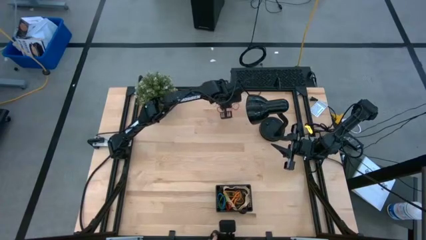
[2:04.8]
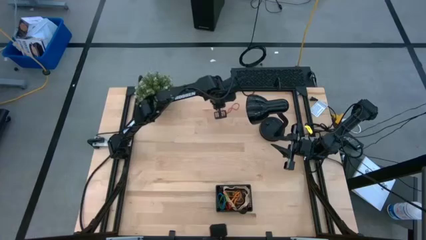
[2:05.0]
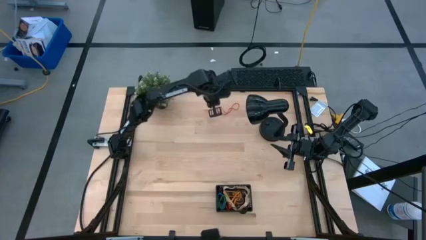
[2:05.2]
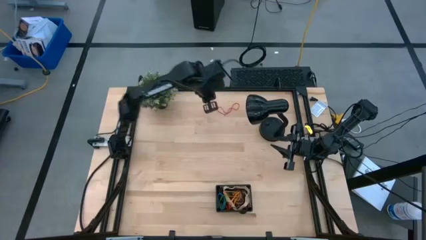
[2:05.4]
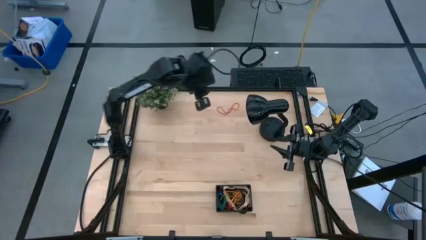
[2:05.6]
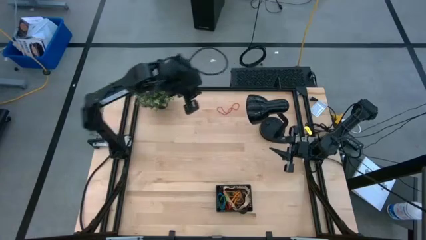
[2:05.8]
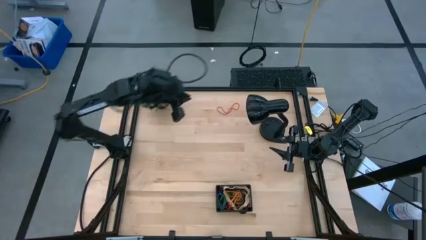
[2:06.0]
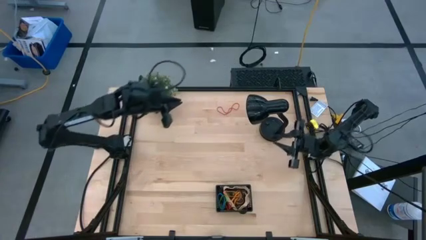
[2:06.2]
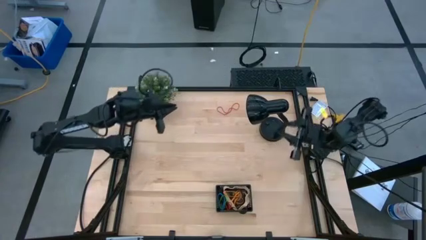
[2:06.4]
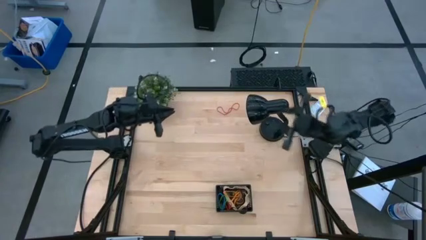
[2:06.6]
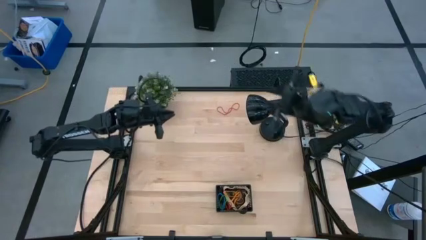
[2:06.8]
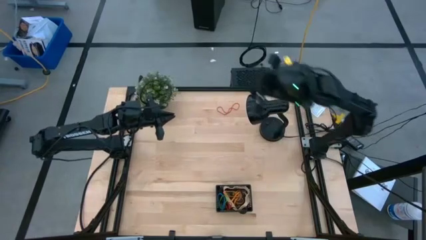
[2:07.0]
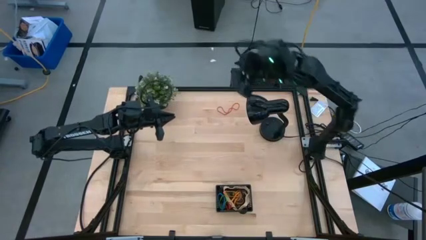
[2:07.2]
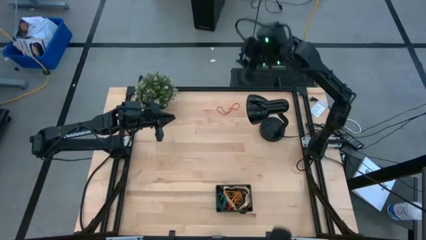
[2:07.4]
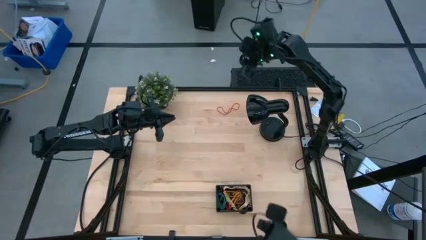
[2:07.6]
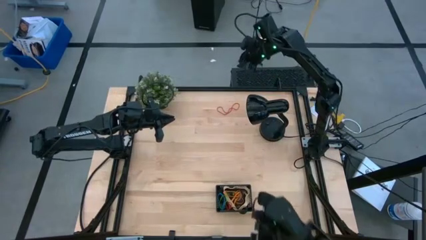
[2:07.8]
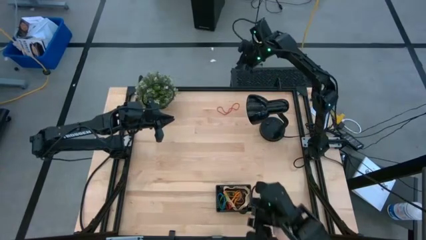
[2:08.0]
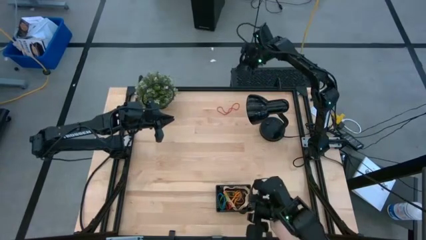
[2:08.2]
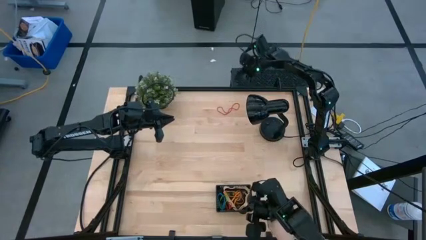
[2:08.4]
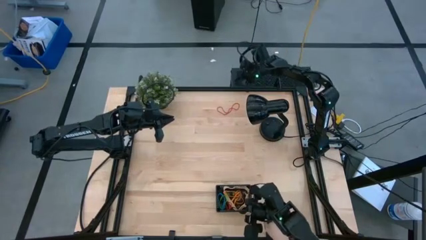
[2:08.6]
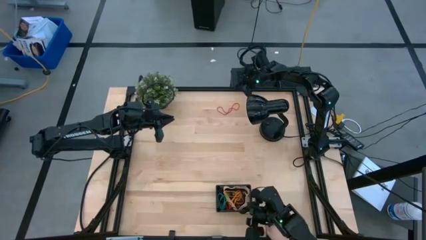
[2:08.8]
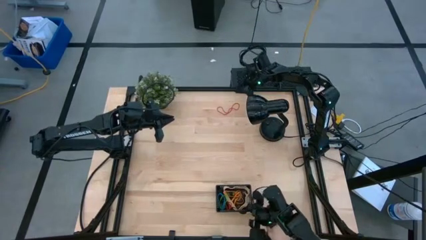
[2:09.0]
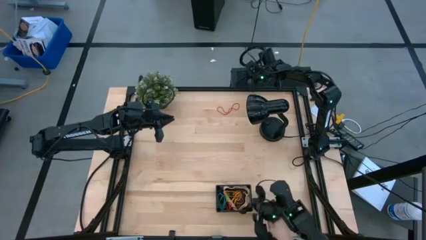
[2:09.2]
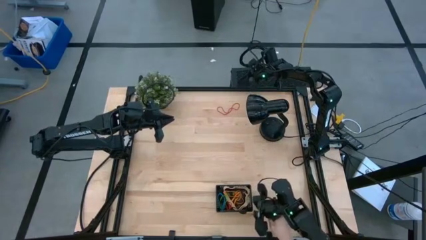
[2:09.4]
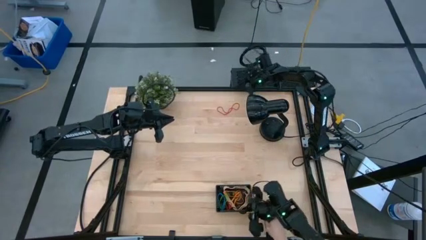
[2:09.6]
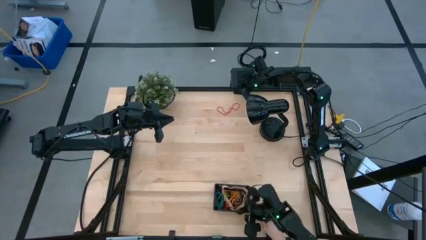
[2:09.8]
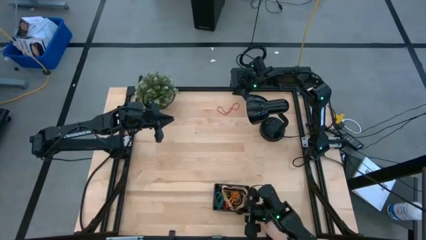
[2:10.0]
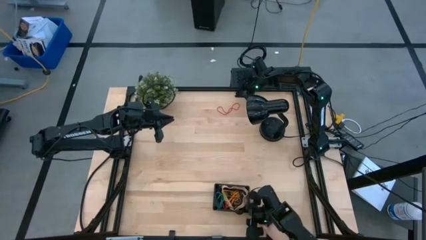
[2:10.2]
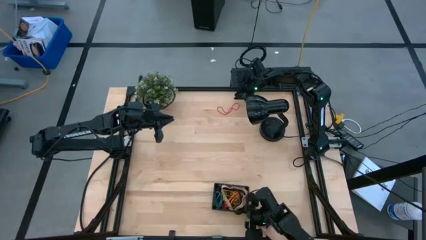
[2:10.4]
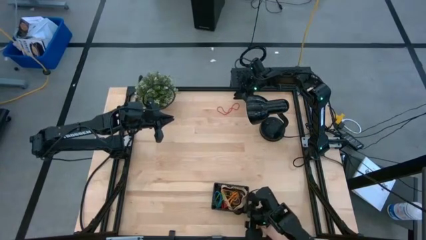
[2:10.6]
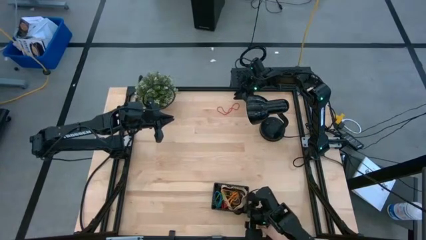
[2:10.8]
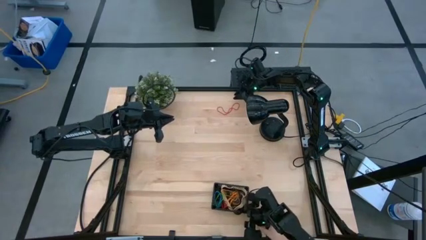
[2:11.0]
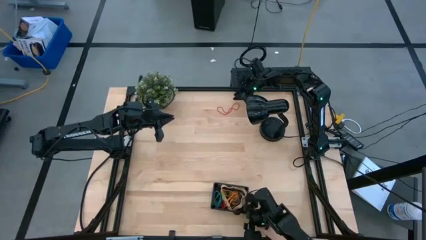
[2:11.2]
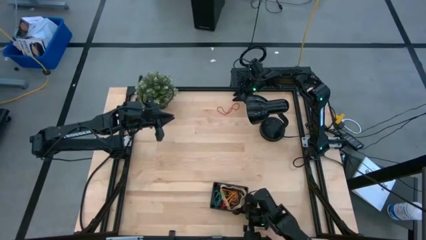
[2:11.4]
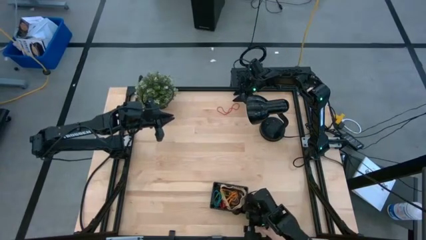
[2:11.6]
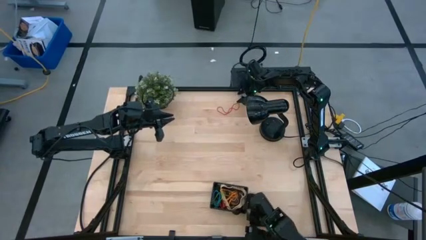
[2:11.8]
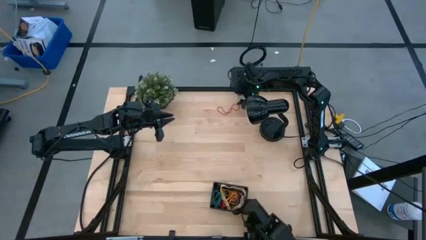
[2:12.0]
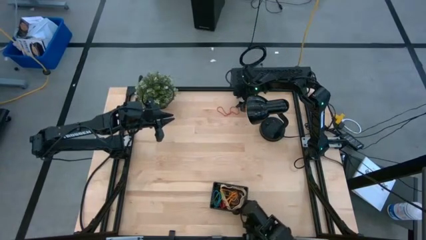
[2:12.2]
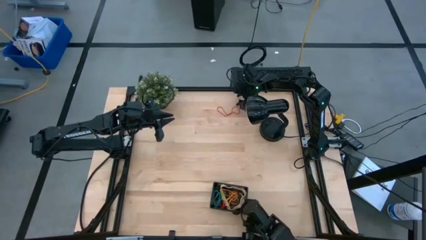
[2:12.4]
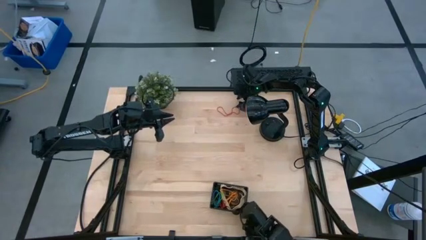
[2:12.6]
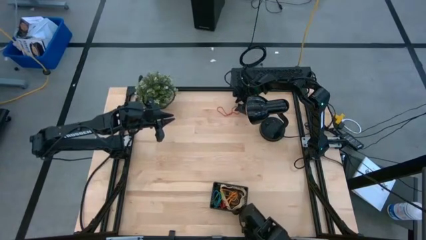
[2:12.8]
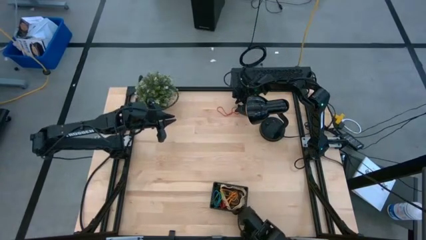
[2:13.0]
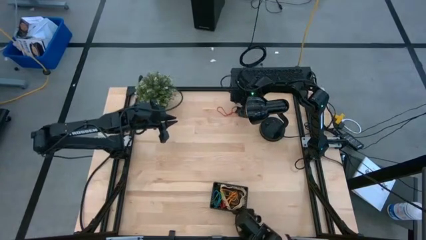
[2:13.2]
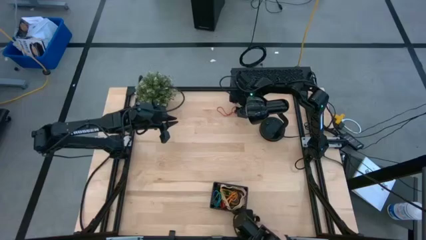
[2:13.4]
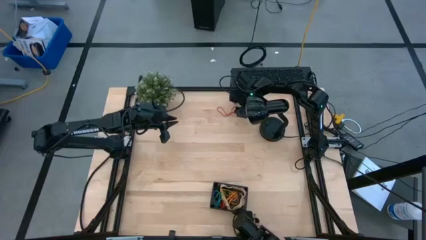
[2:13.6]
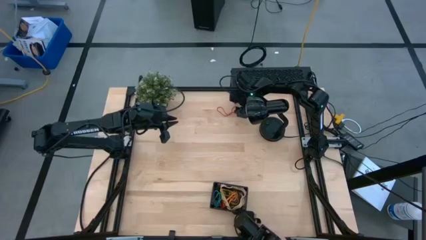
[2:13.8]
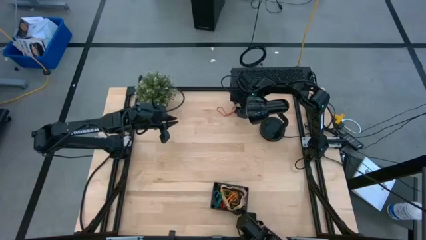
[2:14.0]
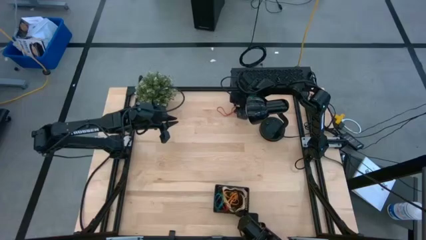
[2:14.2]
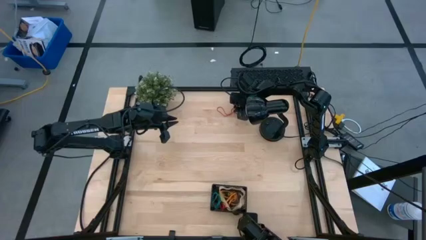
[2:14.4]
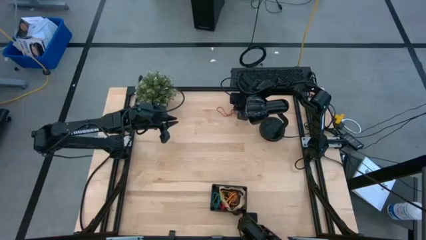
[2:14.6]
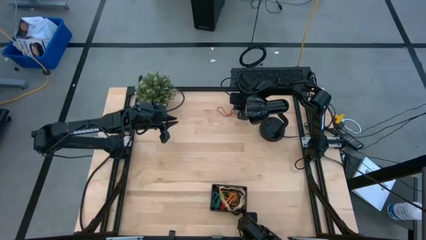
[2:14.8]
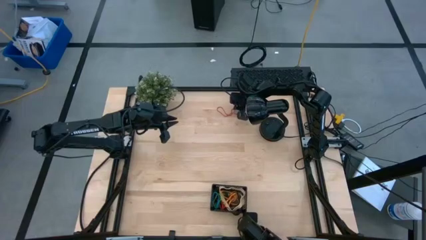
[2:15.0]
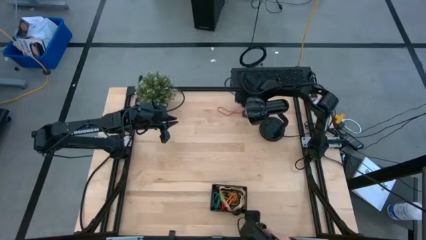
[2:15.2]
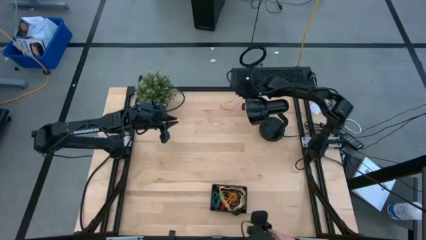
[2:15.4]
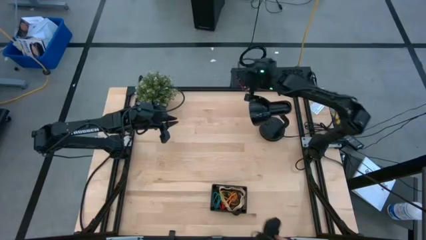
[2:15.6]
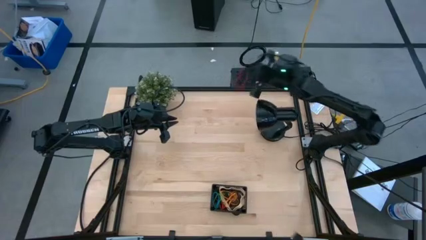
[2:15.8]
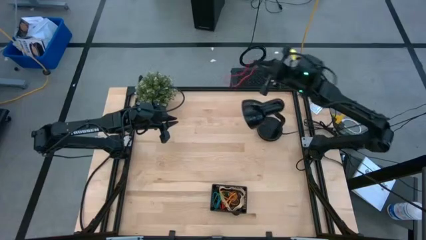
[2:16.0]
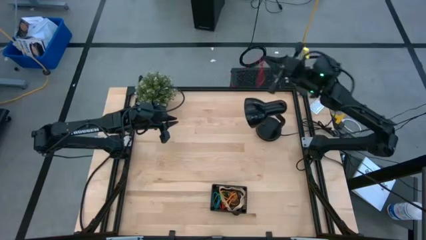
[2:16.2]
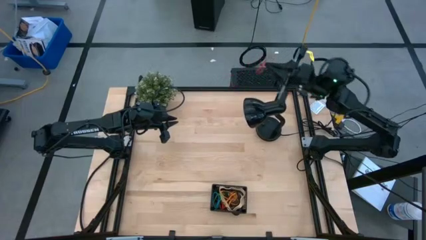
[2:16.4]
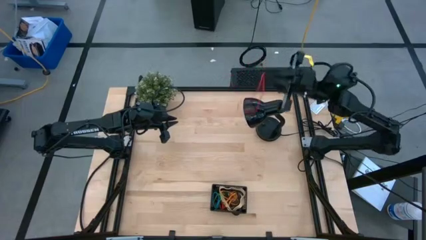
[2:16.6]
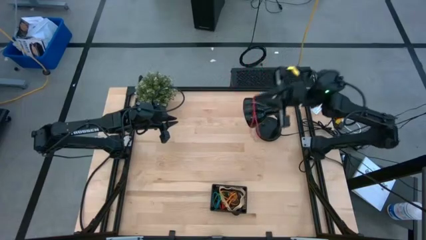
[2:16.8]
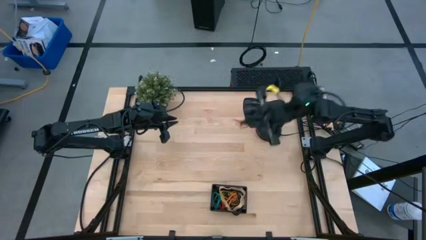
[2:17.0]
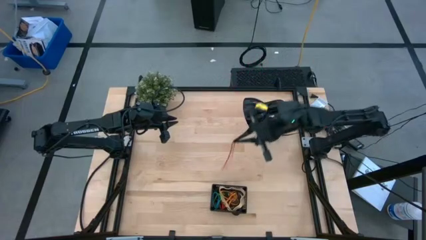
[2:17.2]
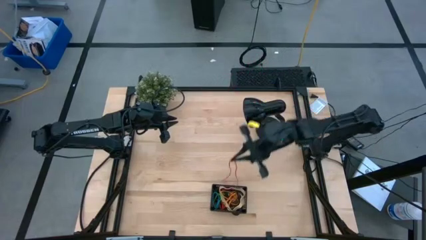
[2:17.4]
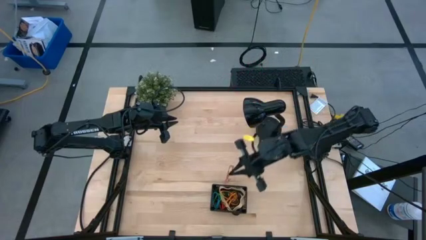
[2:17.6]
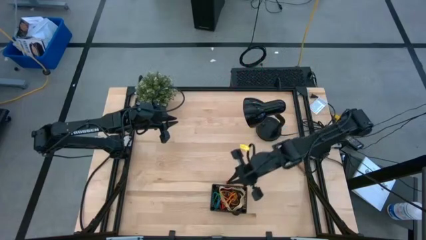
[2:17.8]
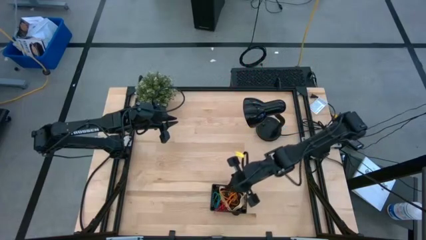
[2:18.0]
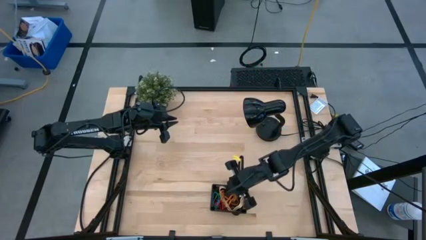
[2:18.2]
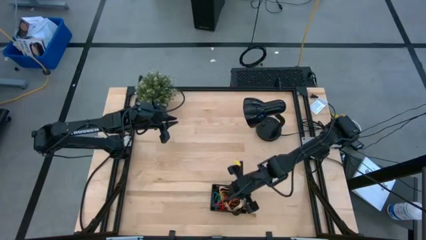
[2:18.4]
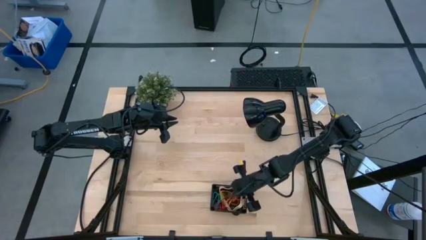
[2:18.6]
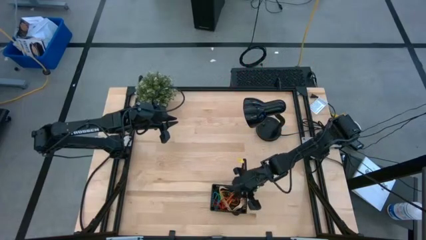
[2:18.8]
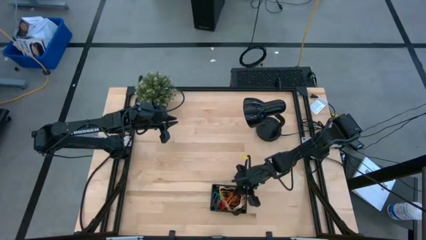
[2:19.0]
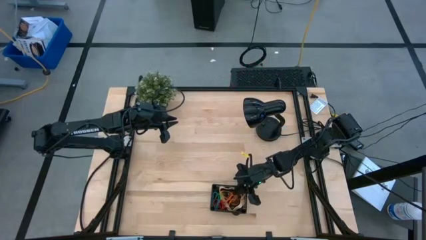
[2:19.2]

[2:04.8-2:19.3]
Task: Pick and place rubber bands into bin
Put the red rubber band into the black bin

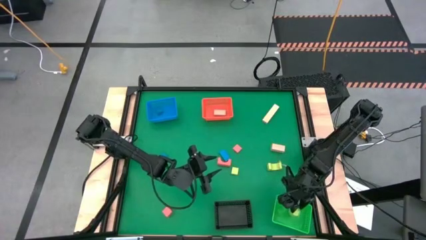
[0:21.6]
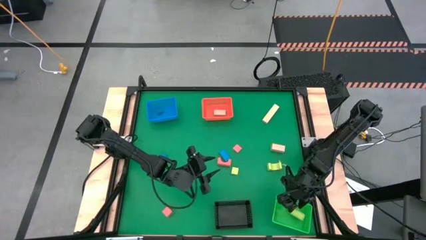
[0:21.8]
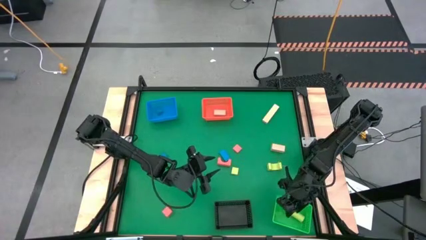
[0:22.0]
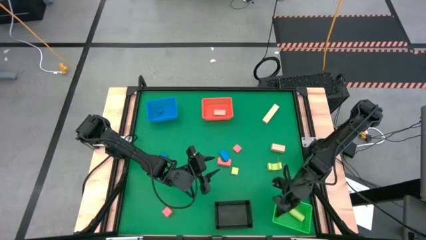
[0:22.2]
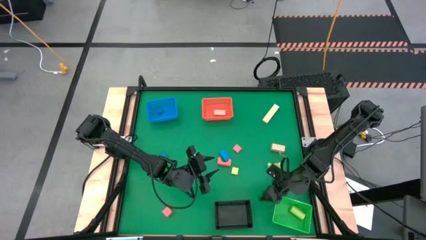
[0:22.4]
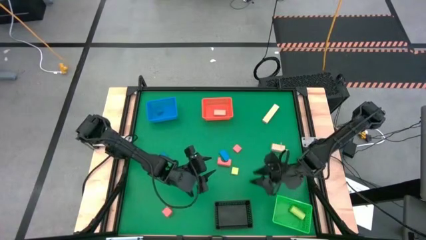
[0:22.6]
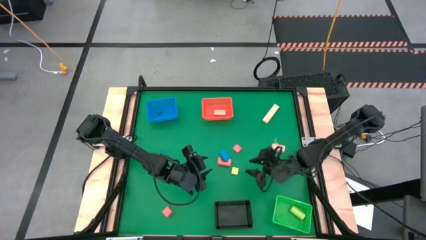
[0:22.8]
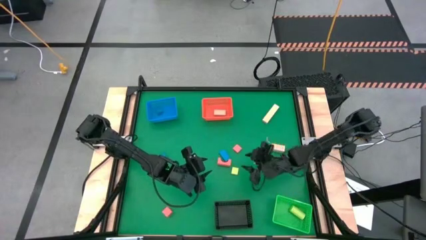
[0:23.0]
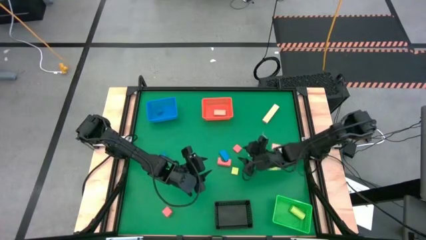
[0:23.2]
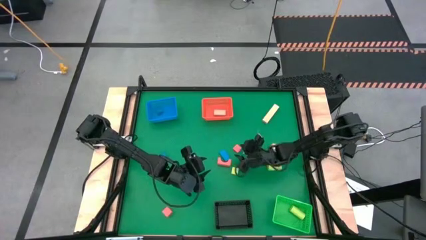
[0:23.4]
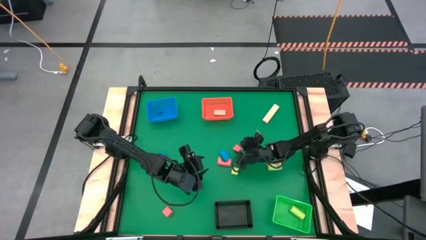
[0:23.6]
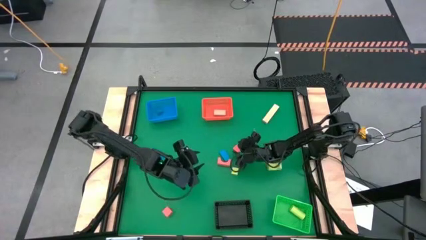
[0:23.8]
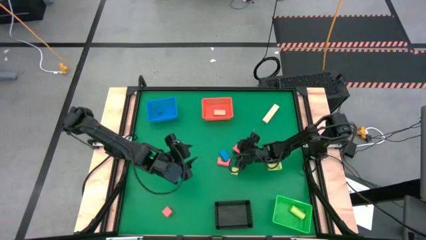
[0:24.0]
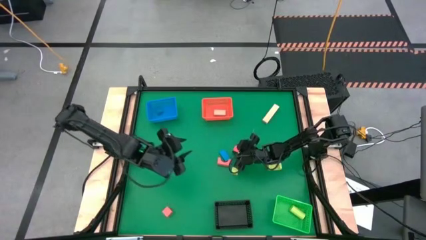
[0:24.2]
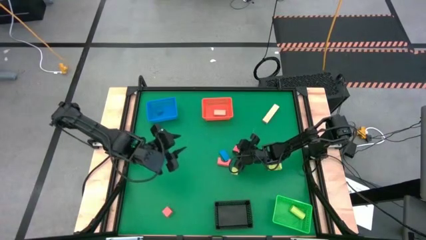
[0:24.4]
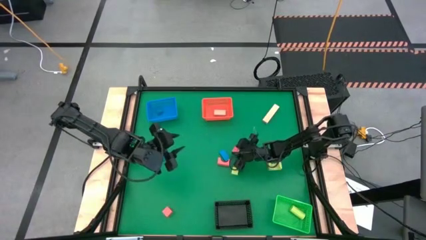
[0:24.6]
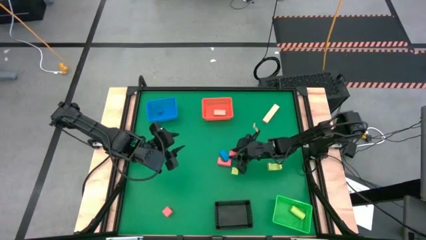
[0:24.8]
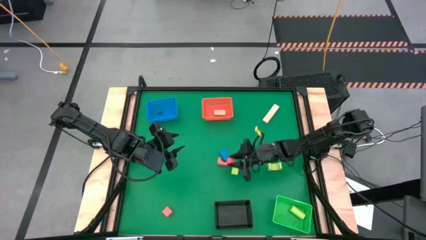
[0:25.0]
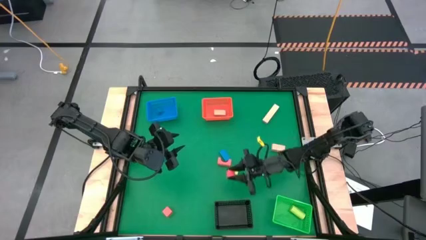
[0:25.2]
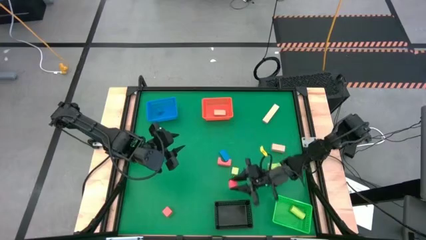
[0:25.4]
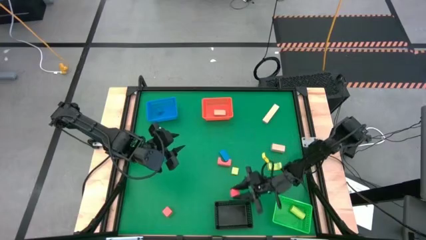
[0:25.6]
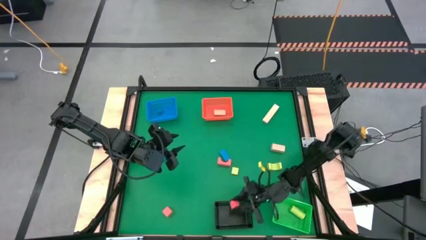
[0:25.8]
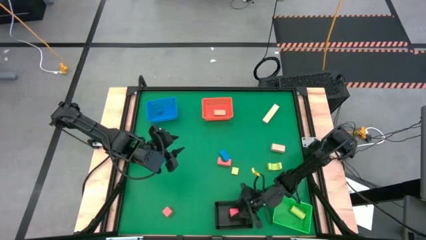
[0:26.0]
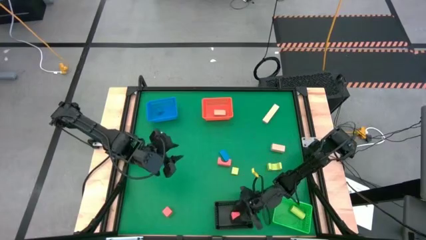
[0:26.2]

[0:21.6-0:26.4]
Task: Sort & place blocks by color
Put the top red block into the black bin
